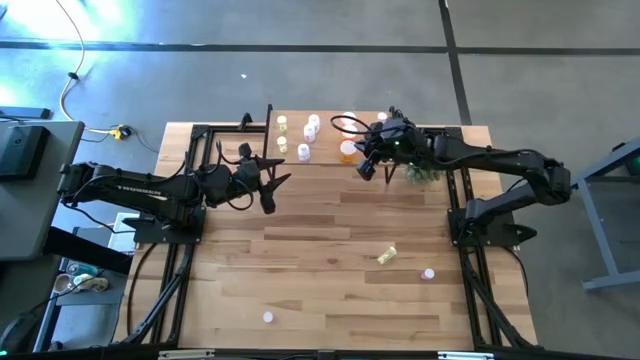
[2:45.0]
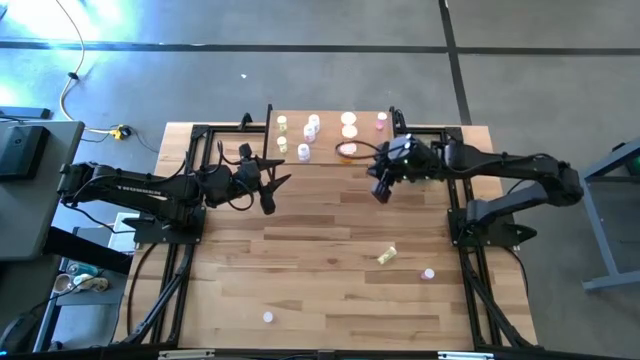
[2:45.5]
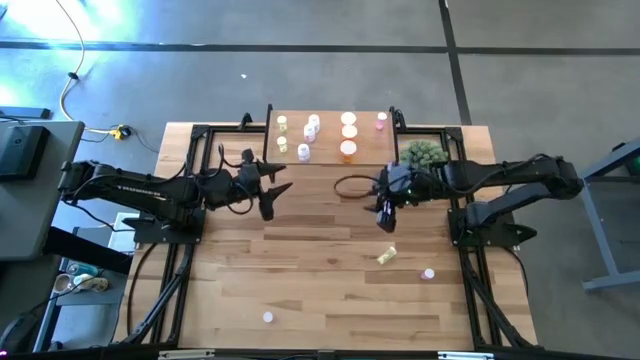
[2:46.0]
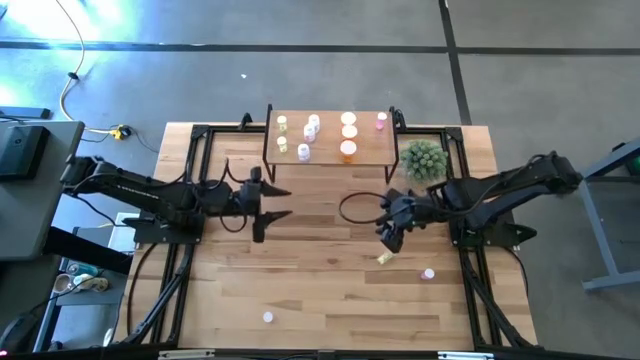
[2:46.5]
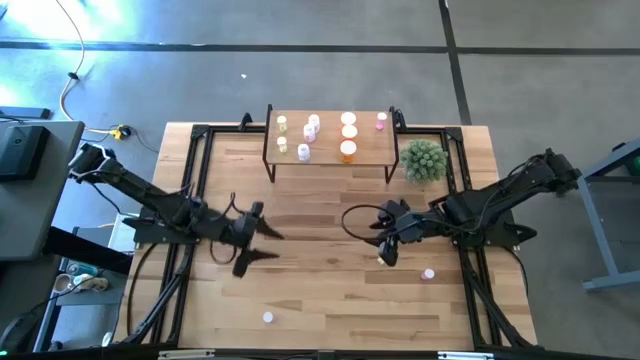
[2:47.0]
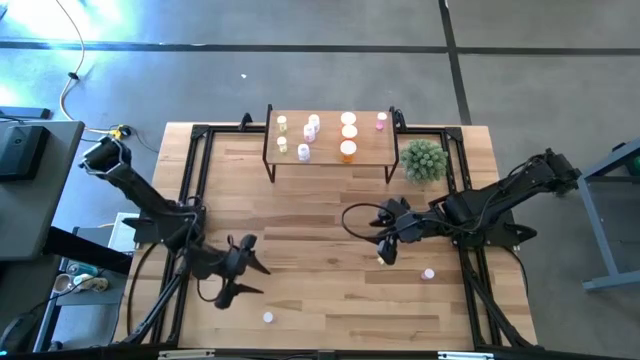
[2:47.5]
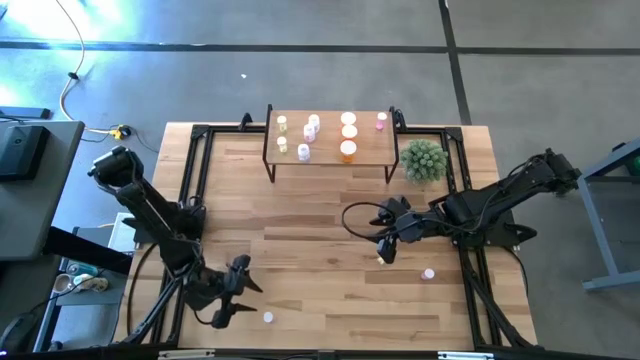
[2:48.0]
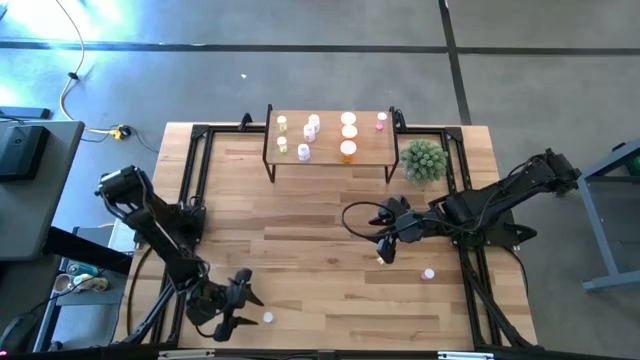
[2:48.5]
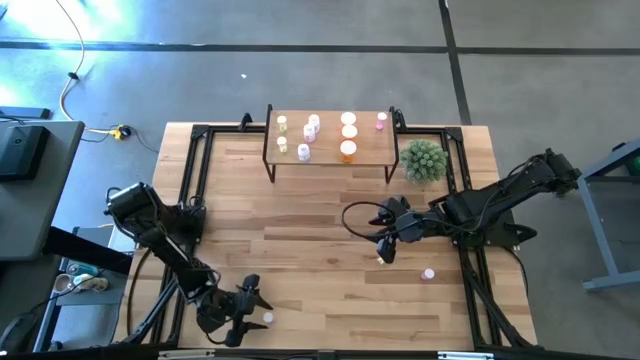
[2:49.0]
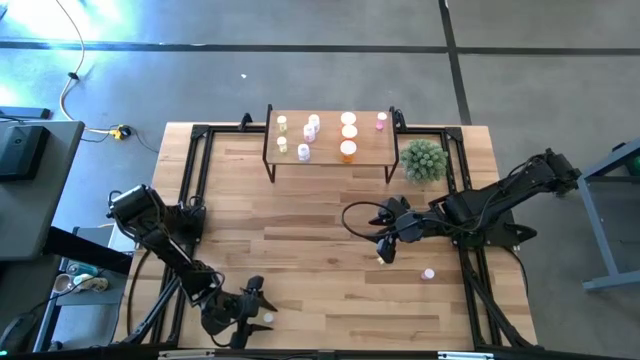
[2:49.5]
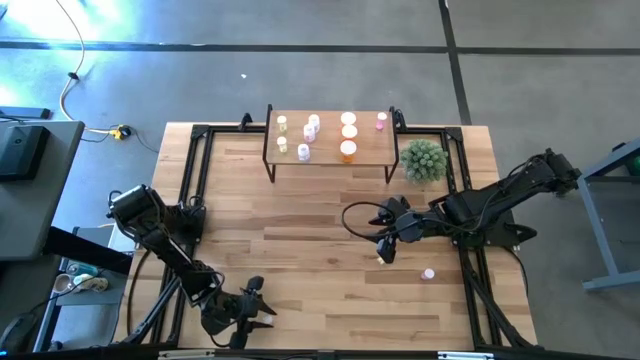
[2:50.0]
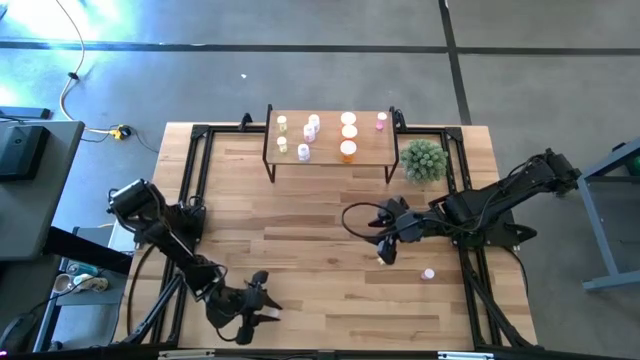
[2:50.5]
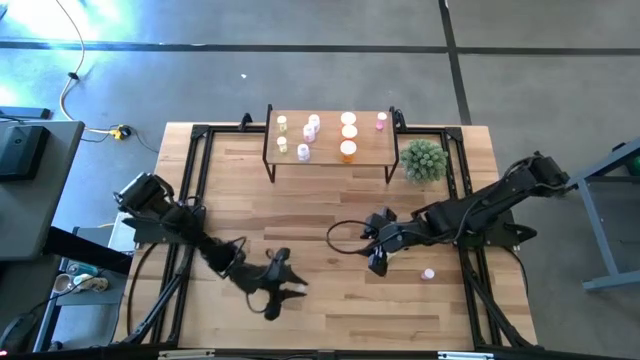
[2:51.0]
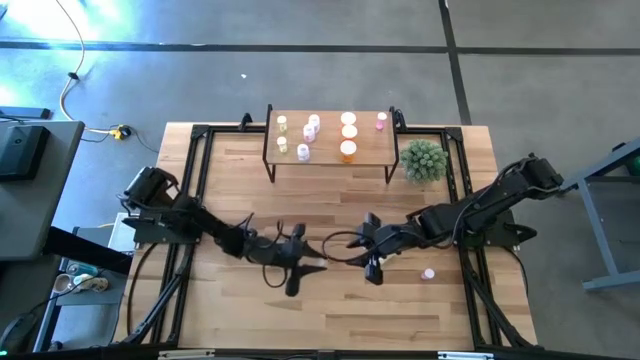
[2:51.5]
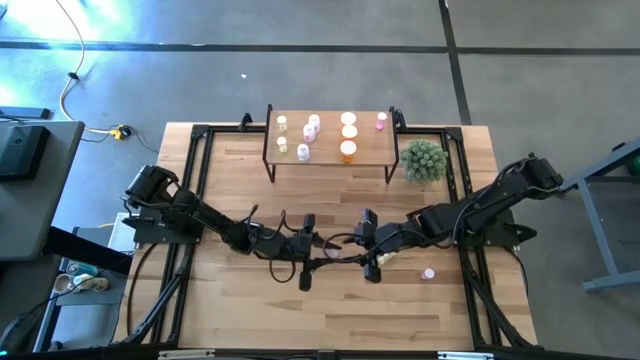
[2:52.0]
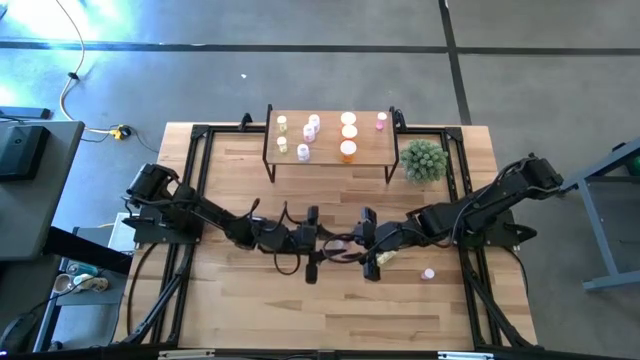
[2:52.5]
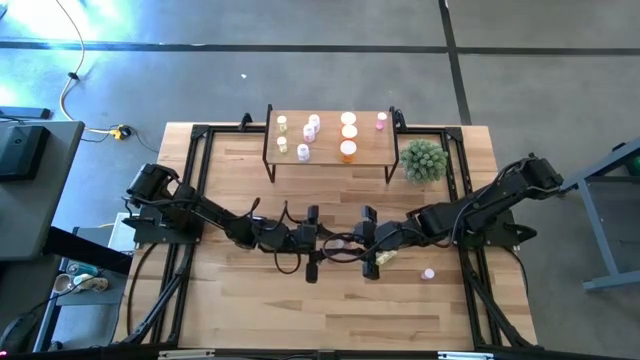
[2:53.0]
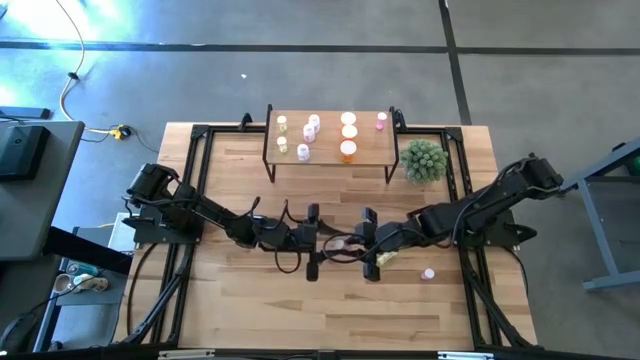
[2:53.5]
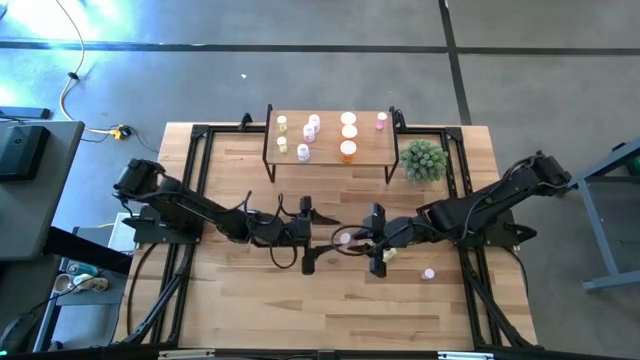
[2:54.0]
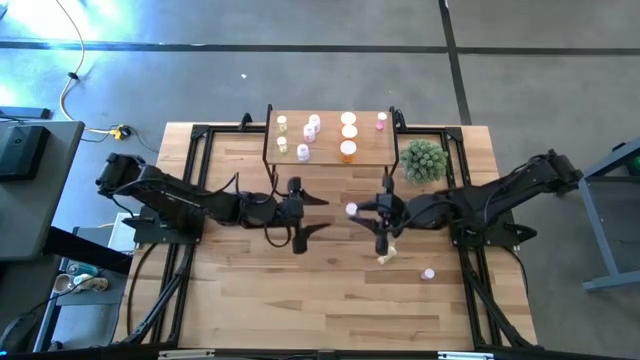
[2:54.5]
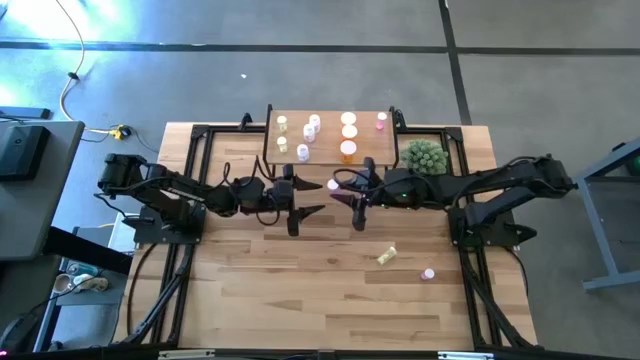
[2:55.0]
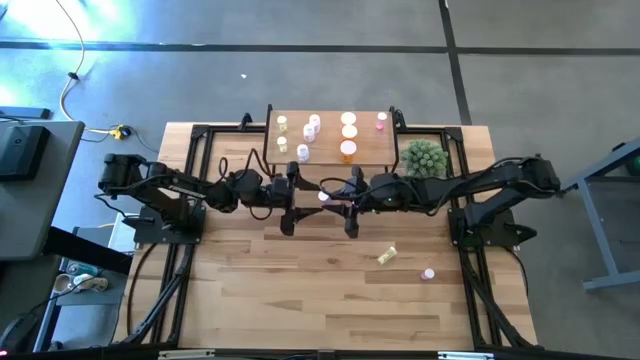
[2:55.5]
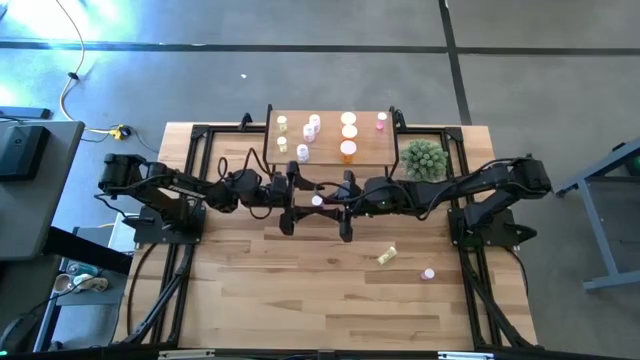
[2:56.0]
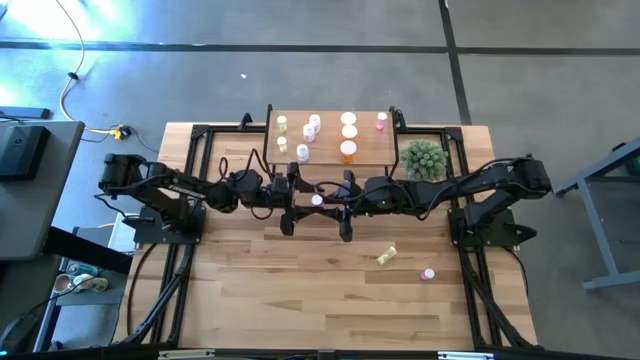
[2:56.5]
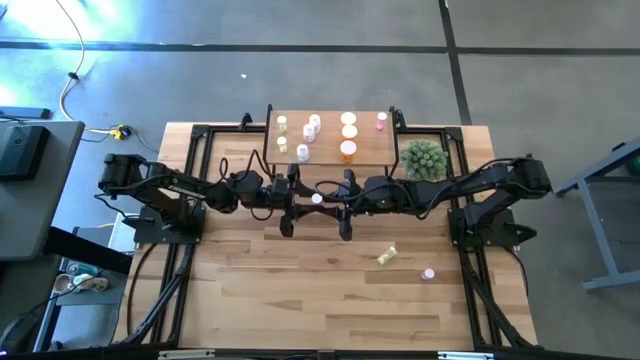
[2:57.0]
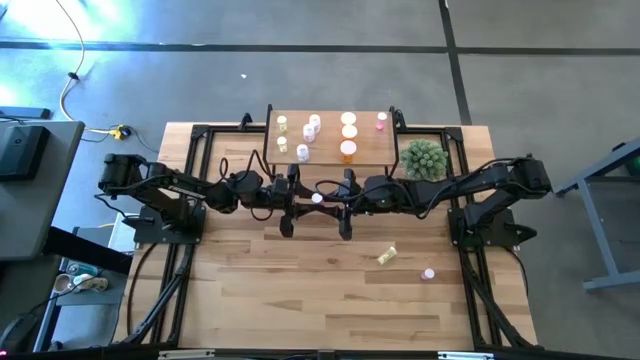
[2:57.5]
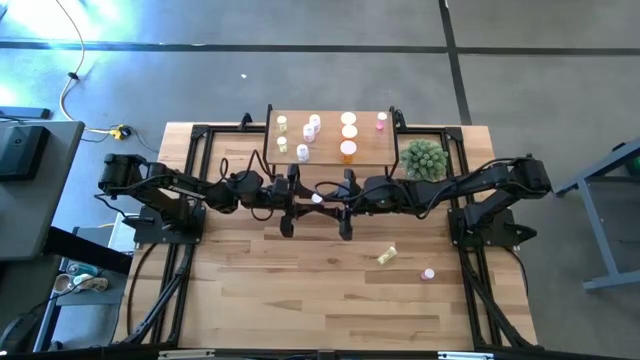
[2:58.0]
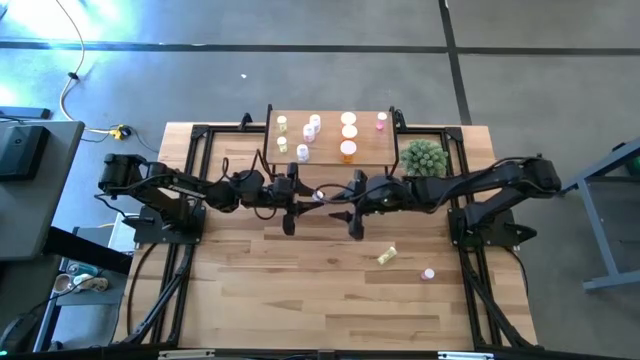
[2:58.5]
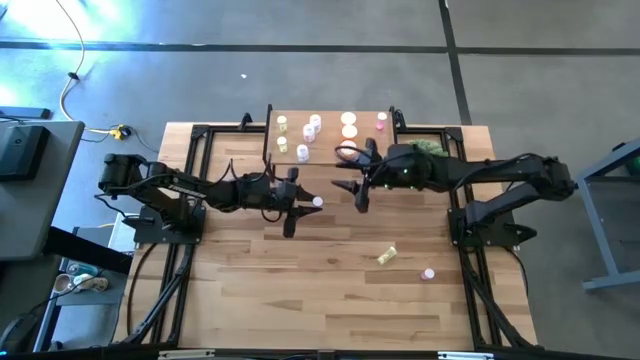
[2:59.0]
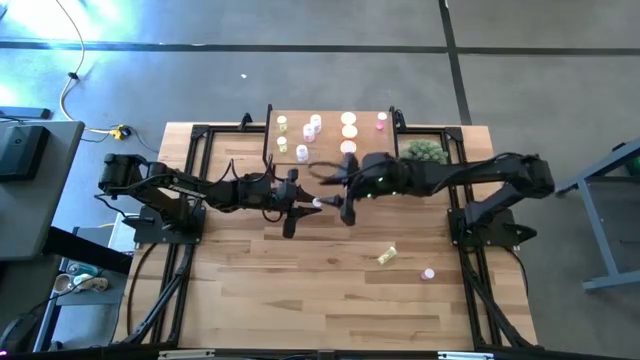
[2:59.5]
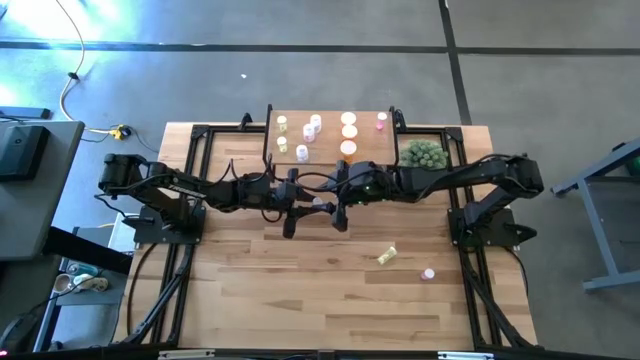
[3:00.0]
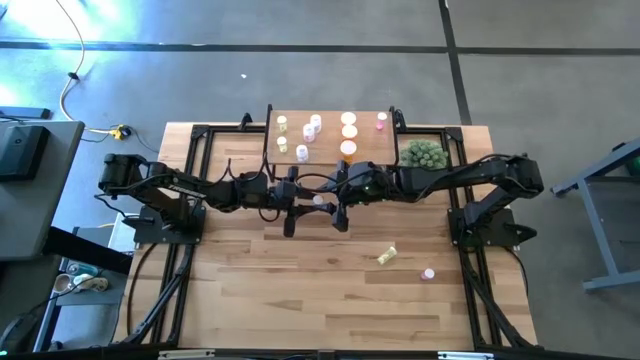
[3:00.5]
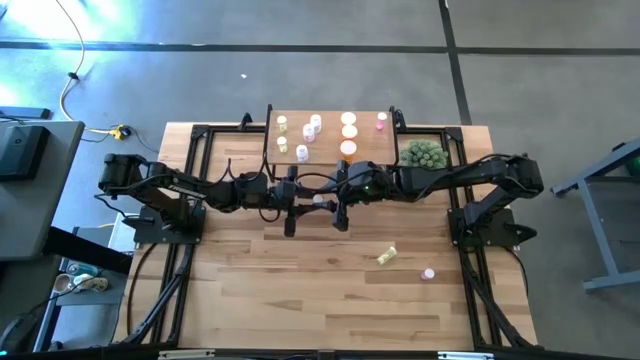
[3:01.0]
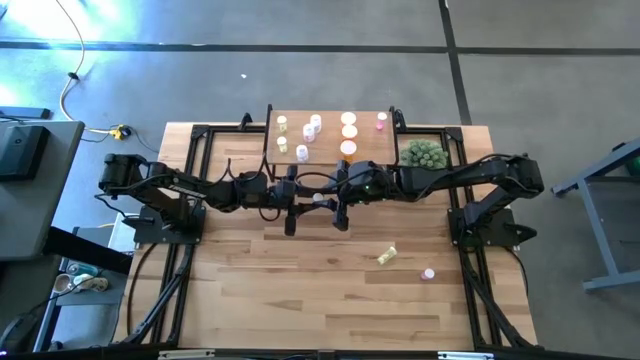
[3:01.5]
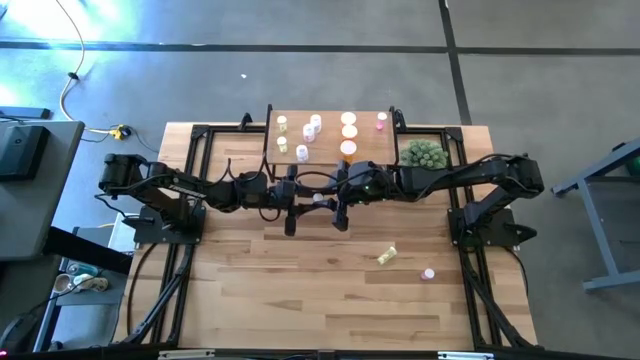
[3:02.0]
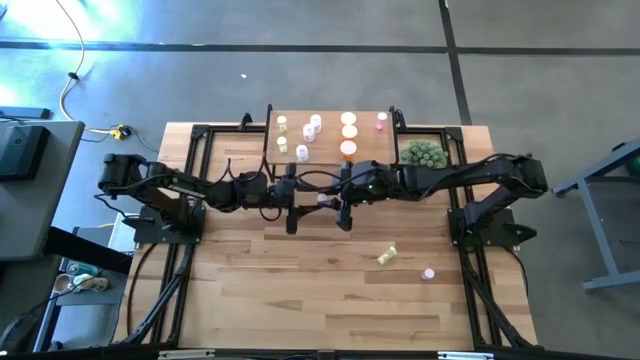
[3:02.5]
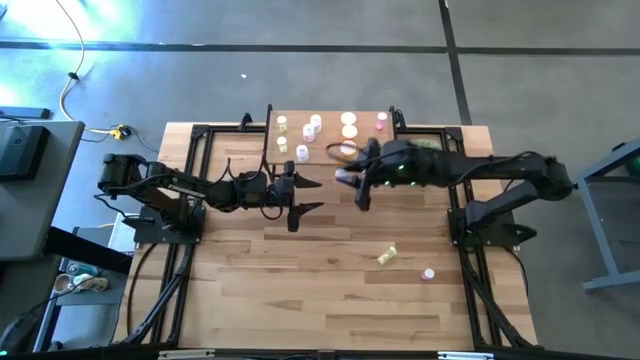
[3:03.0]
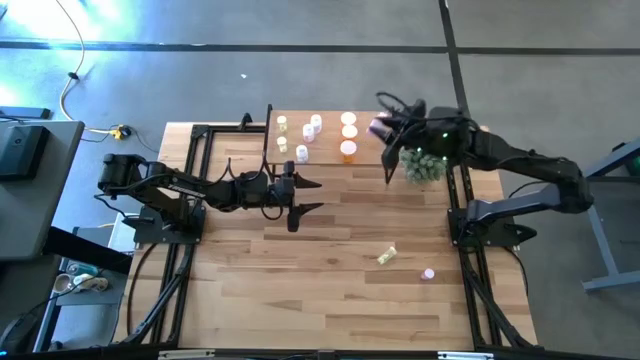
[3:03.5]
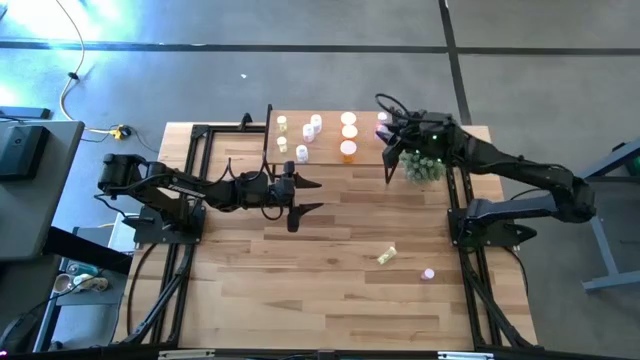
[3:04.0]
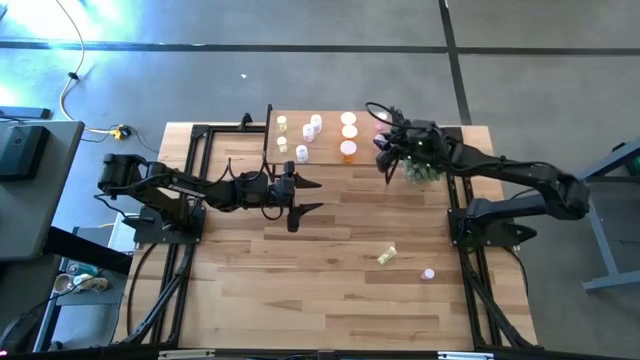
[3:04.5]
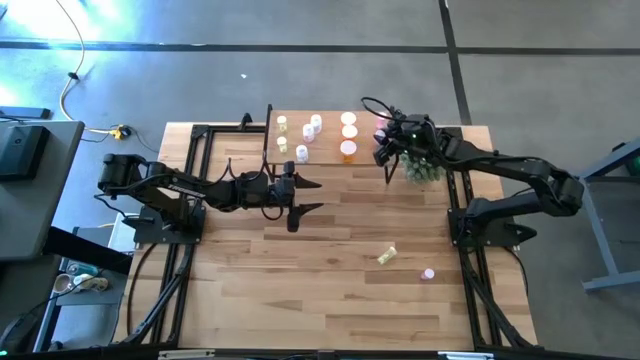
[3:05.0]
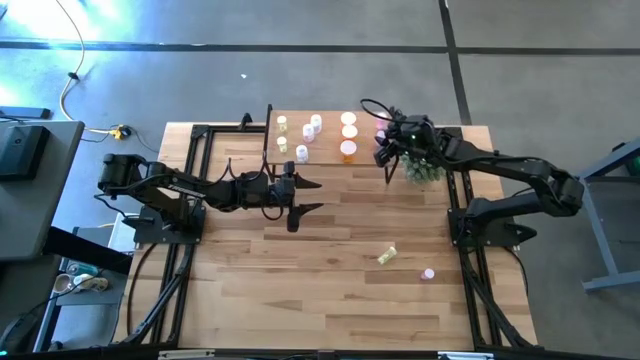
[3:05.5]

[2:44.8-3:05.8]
Task: Pick and place medicine bottles onto shelf by color
Put the bottom pink pill bottle aligned with the other pink pill bottle on the shelf

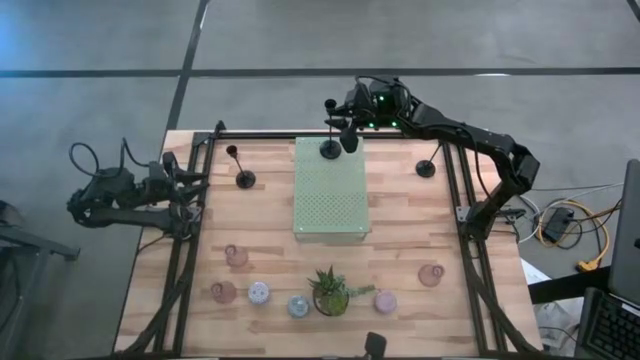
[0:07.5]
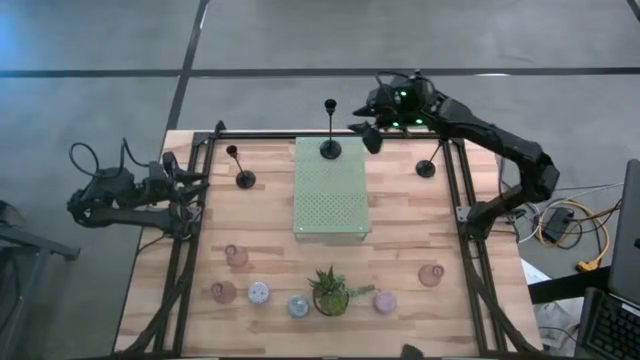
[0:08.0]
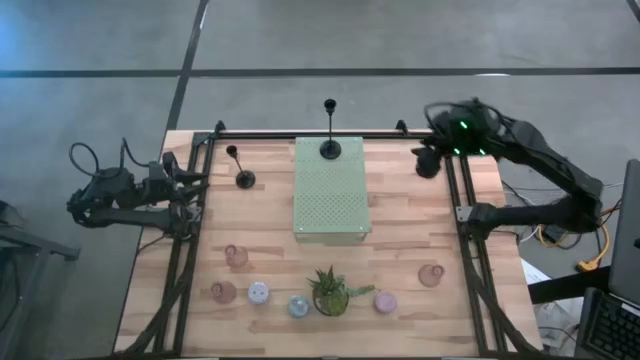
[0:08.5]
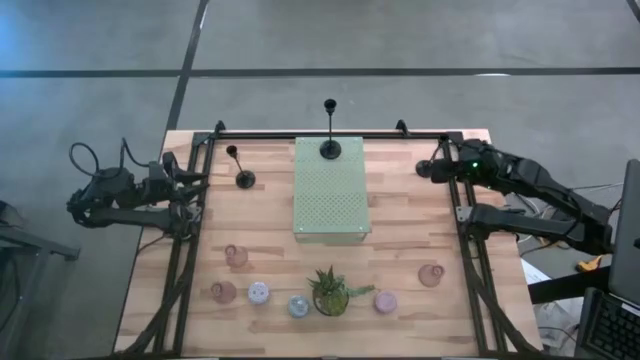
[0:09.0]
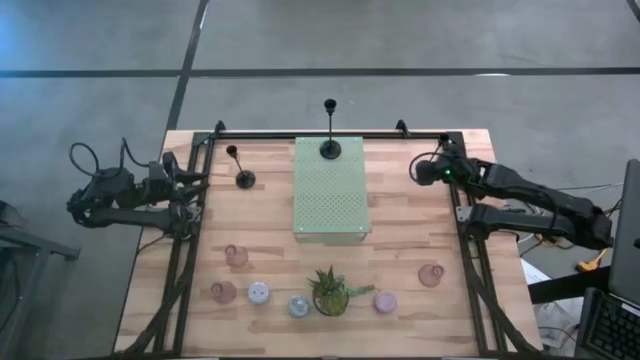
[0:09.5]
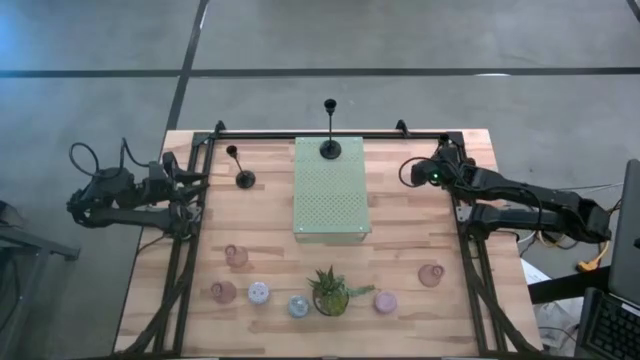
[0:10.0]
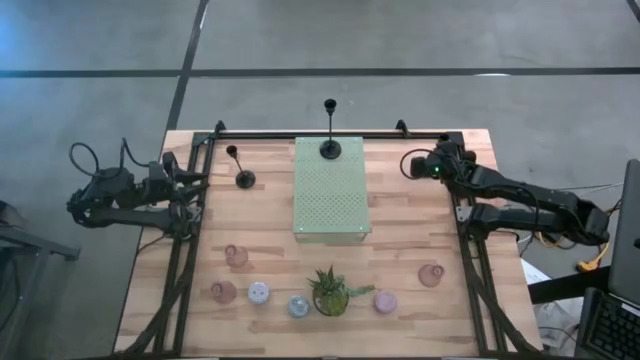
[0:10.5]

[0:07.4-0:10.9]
Task: Pick & Place candle stick holders
Put the right black candle holder on the shelf
